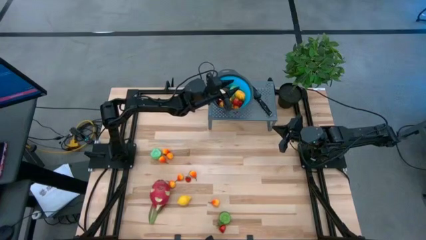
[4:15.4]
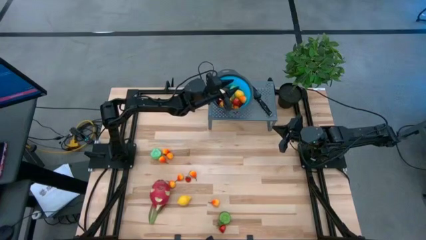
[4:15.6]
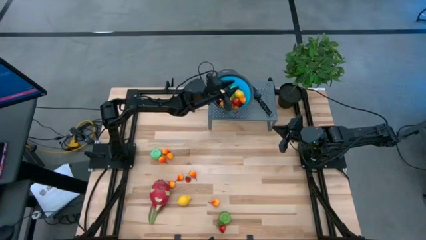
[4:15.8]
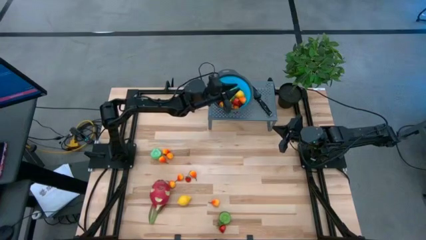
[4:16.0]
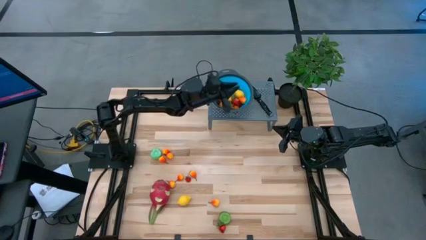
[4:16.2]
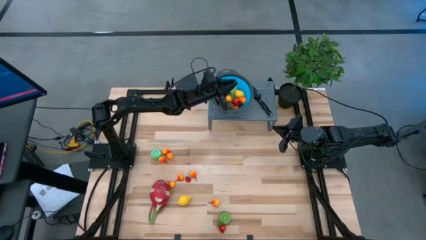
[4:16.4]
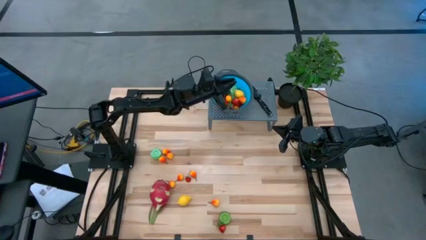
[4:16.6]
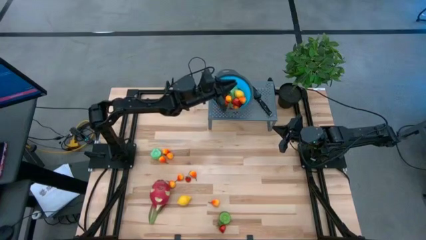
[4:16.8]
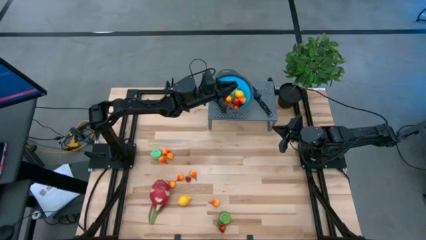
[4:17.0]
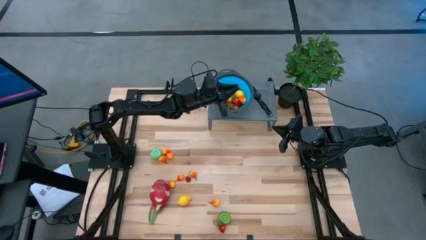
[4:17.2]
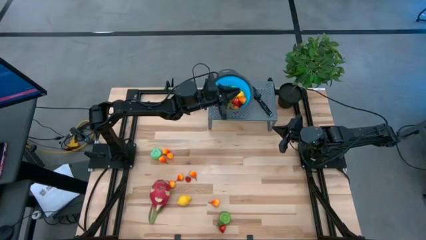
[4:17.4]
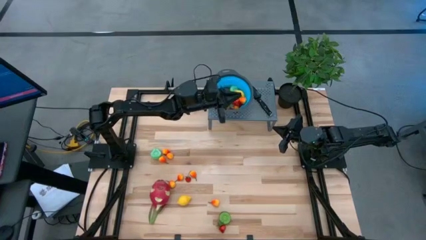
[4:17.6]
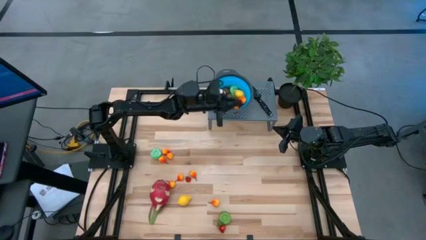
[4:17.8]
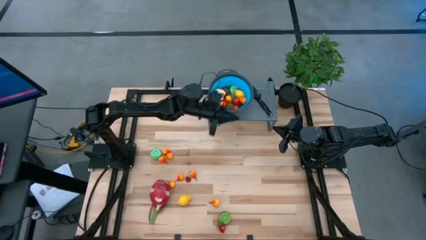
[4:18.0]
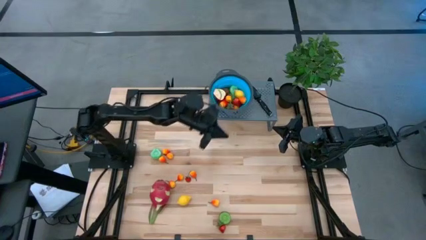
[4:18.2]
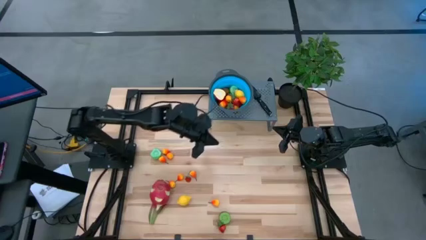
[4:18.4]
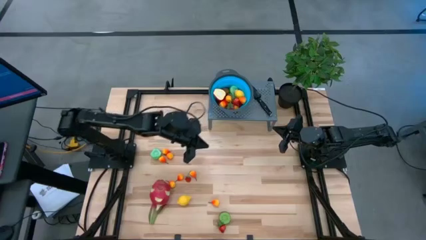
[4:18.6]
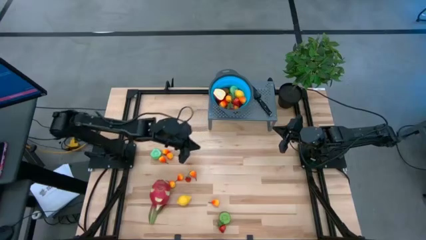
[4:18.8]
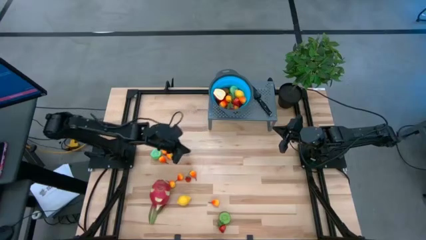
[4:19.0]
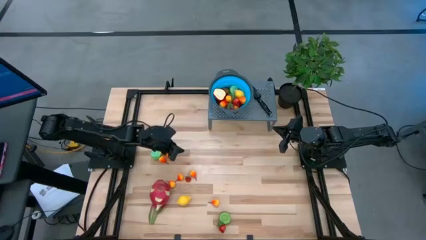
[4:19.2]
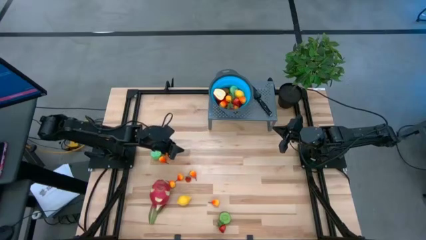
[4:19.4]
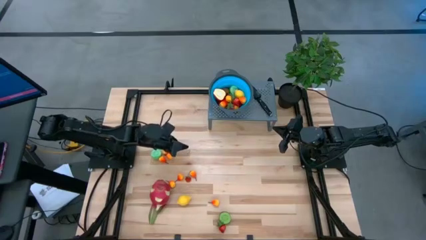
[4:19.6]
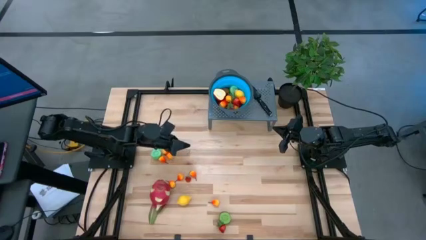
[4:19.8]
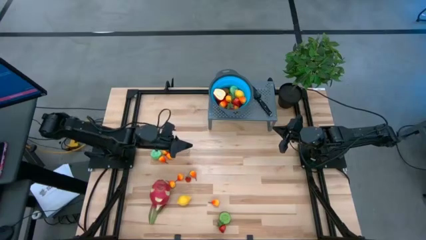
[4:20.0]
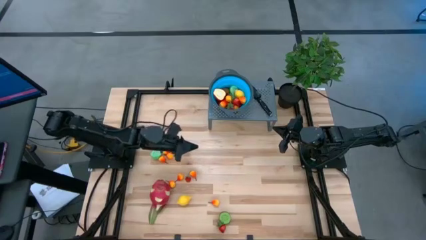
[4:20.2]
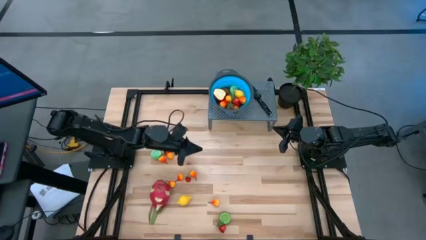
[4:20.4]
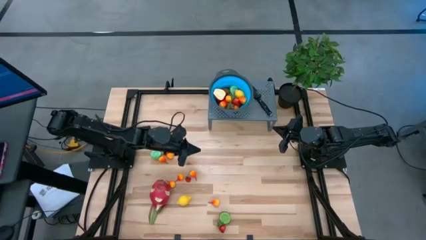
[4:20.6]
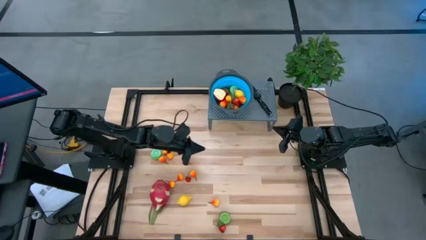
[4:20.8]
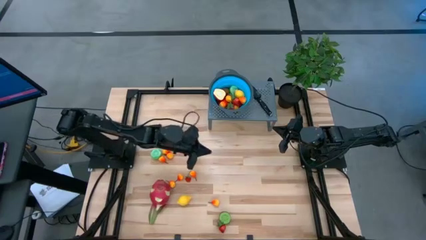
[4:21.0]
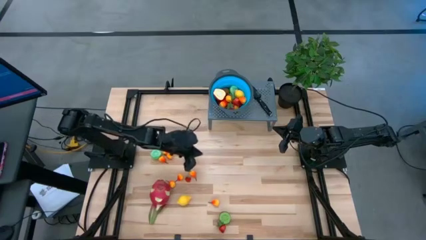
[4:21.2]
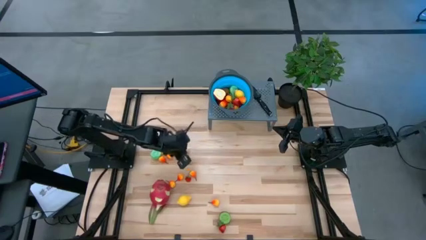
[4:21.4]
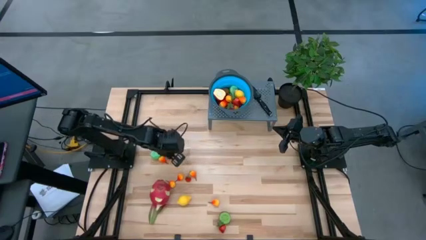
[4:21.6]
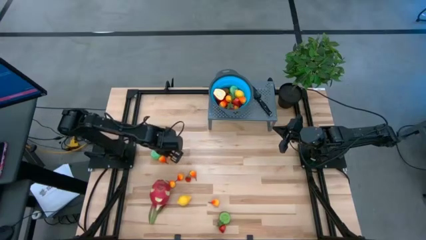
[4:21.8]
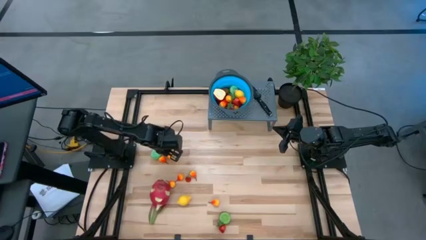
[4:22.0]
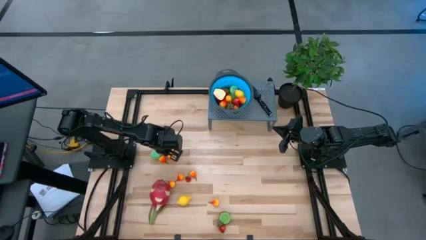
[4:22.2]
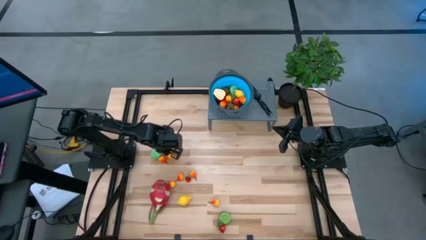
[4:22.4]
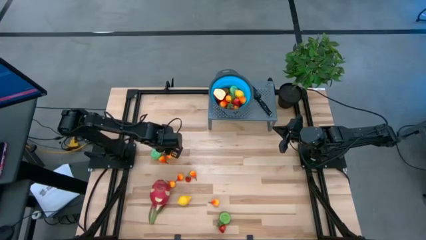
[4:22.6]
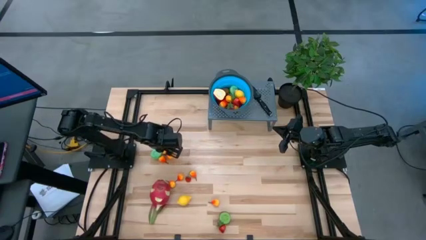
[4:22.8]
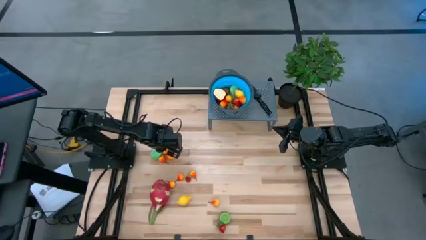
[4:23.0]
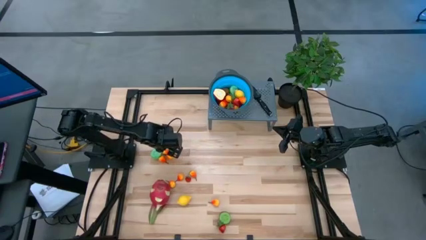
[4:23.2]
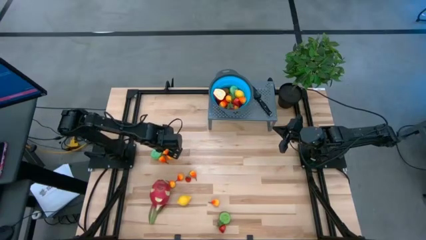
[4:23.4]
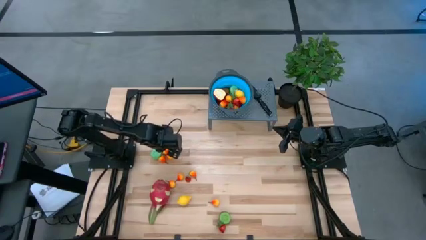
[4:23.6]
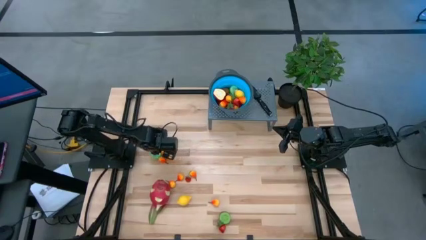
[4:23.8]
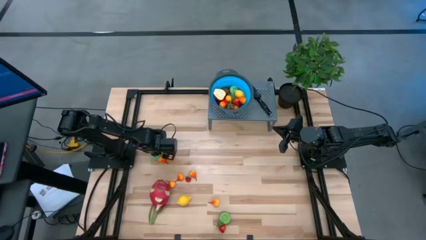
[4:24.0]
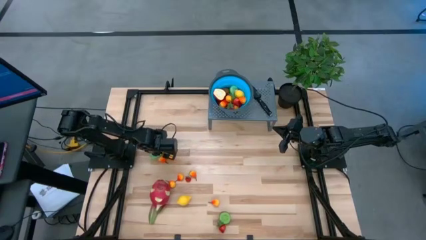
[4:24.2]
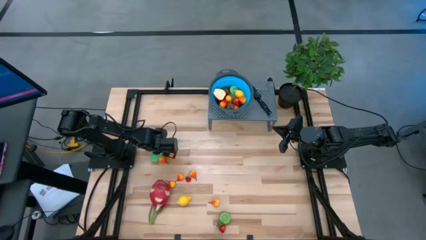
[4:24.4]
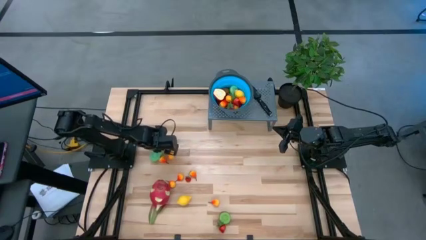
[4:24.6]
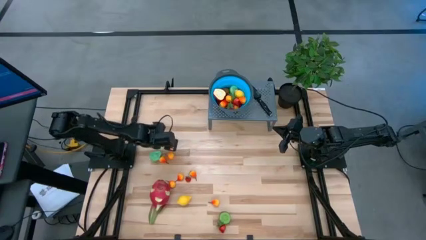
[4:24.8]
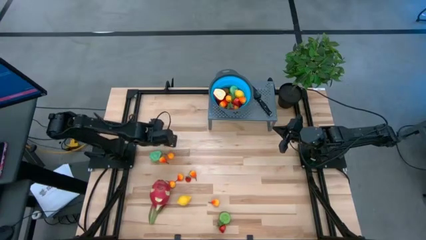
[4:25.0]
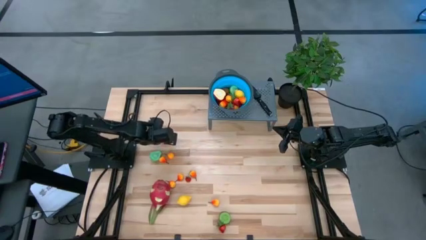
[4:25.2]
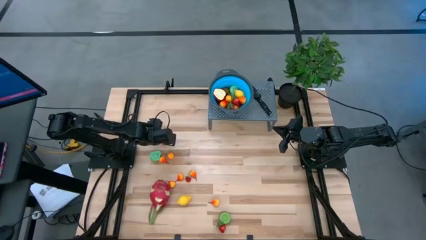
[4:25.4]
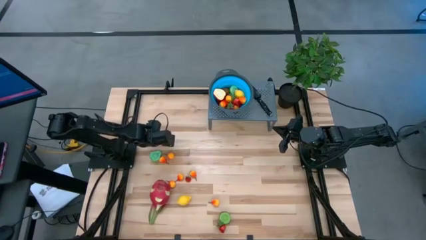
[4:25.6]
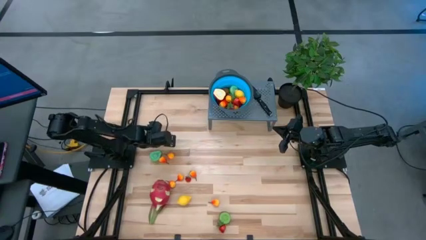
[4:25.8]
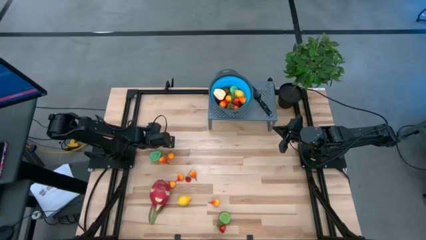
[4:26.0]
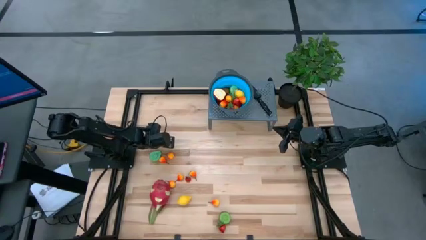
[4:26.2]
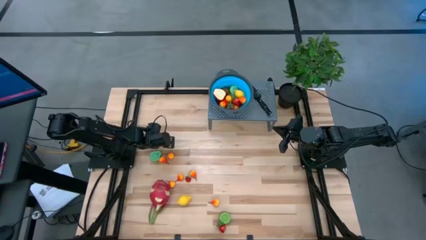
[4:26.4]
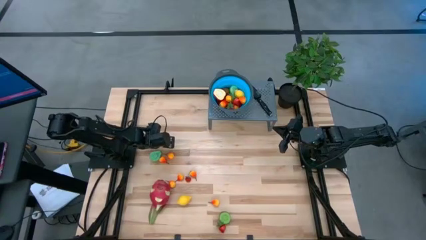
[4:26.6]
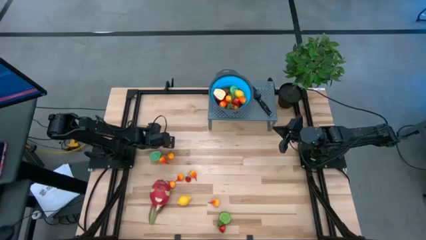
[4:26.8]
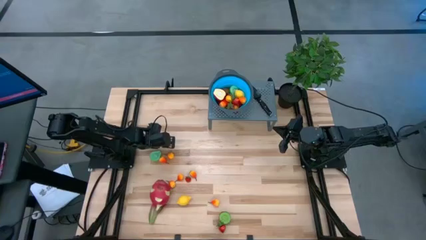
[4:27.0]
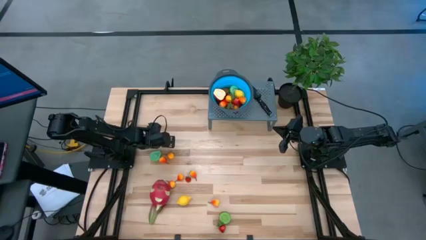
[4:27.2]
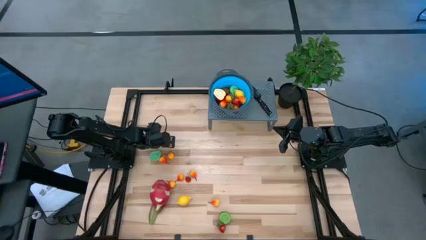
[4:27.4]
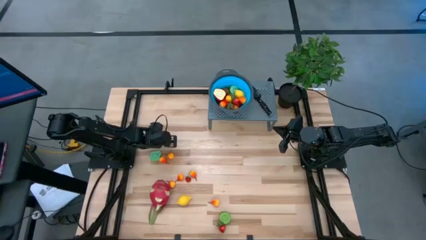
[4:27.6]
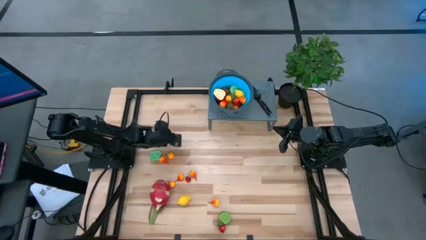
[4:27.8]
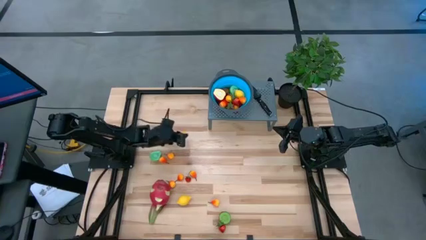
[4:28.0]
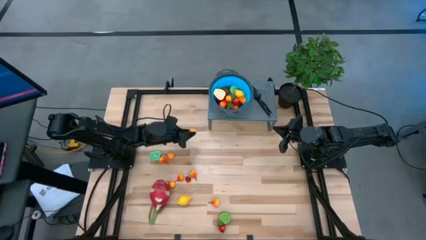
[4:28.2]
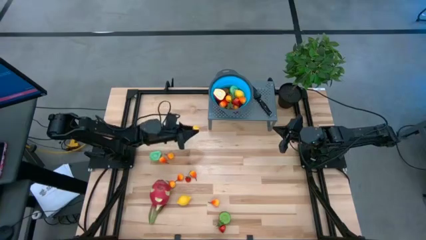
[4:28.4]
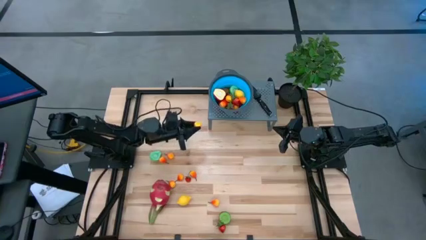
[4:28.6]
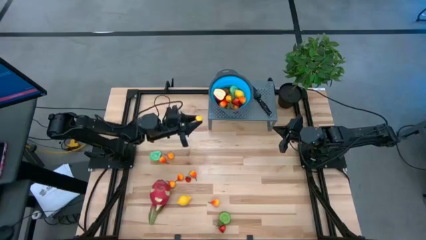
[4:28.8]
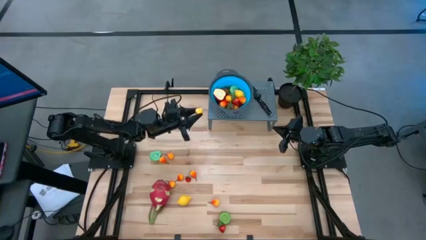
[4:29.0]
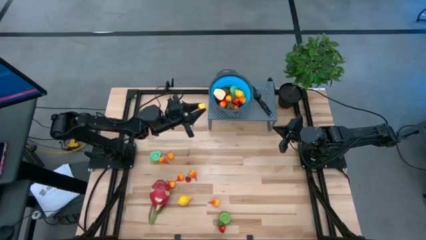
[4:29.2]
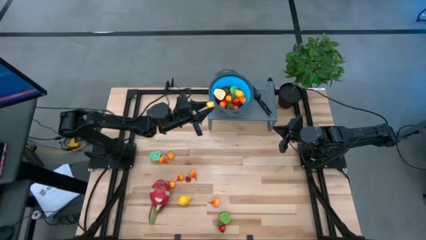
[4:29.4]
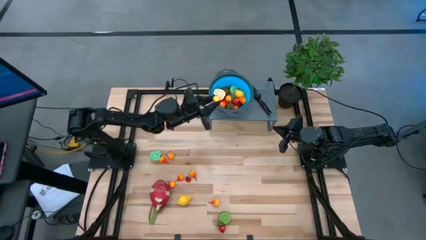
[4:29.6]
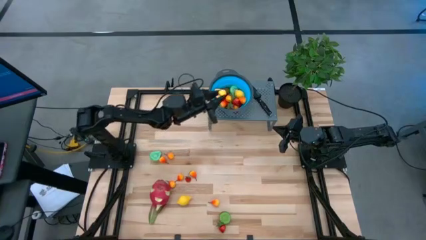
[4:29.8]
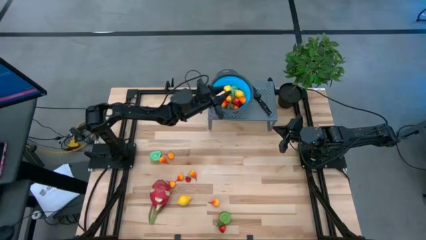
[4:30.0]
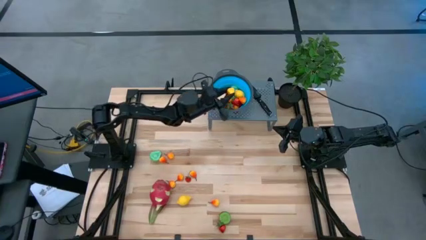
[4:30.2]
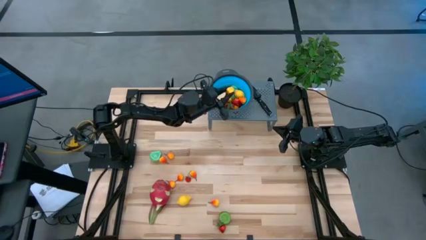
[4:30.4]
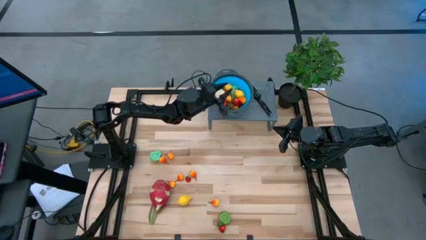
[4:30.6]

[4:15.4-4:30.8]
Task: Pick & Place Fruit
Put the yellow pear into the strainer bowl

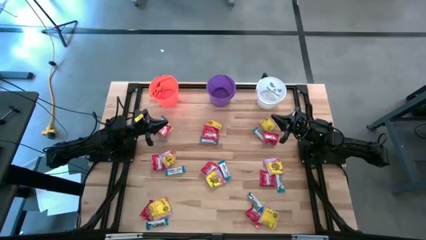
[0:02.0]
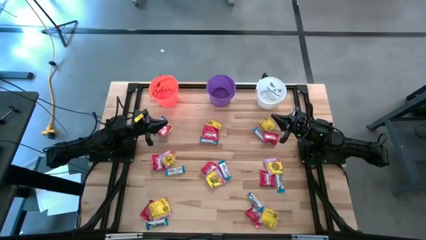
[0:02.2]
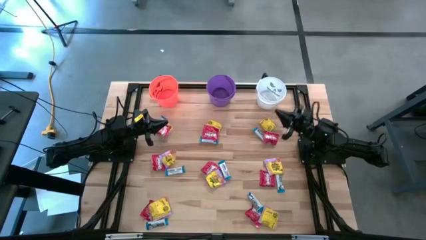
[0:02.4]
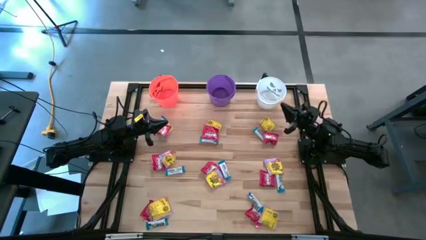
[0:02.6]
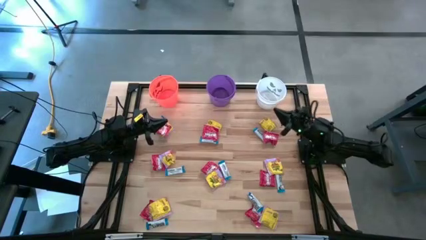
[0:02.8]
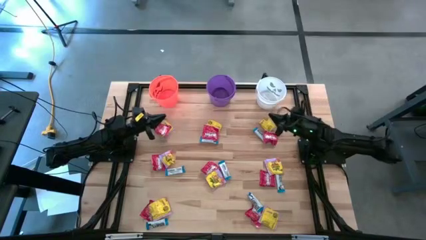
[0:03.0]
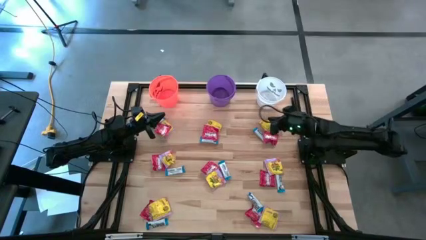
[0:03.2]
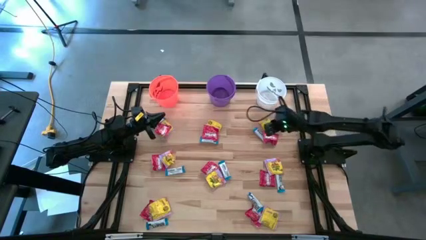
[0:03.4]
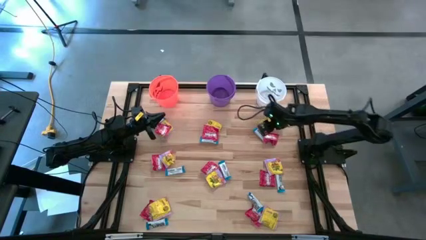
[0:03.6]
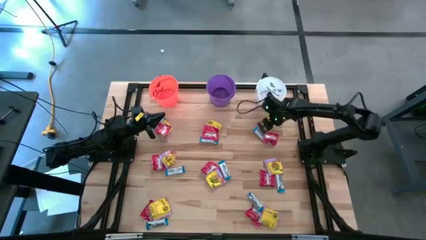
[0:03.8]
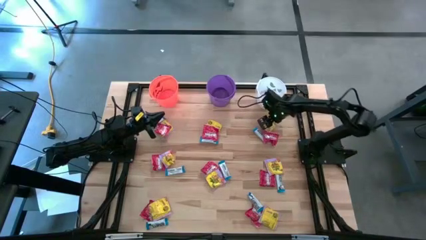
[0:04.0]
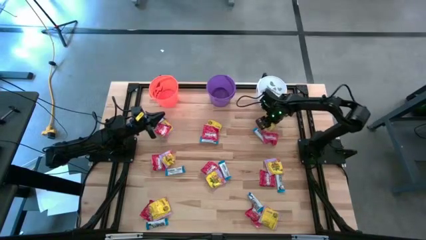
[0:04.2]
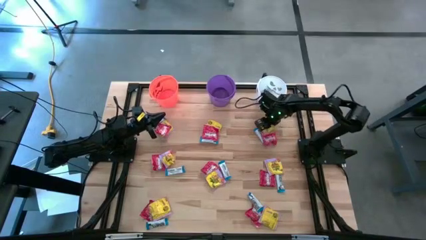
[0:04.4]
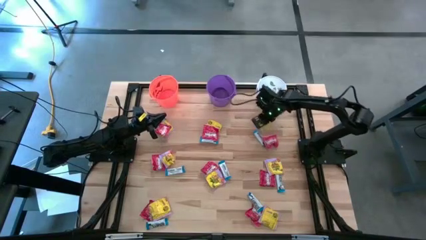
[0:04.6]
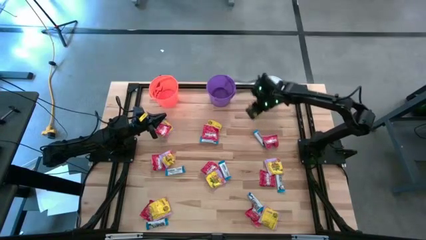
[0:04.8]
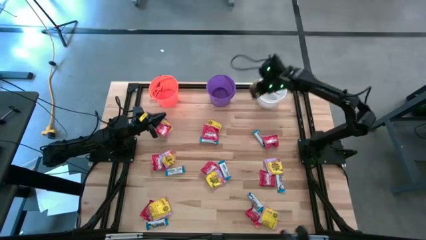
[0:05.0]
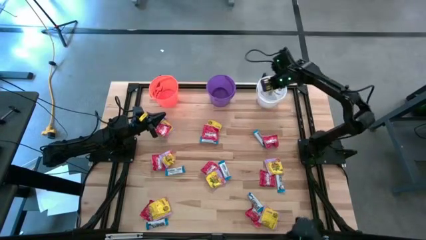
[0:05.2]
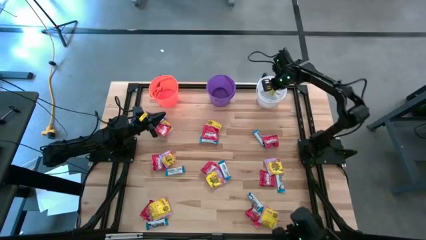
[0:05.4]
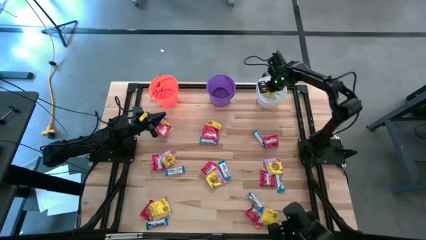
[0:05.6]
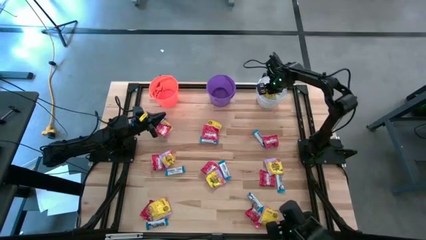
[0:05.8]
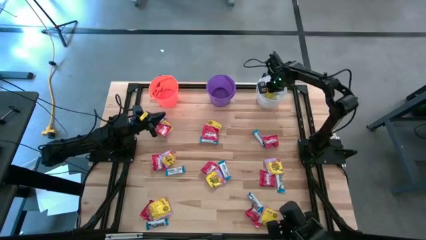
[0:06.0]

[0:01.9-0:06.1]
Task: Sort candy
Put the yellow candy into the white bucket
